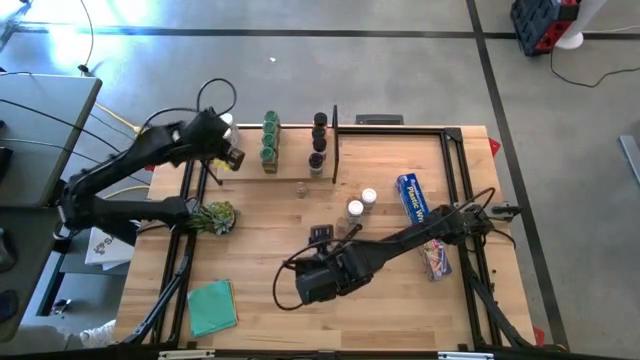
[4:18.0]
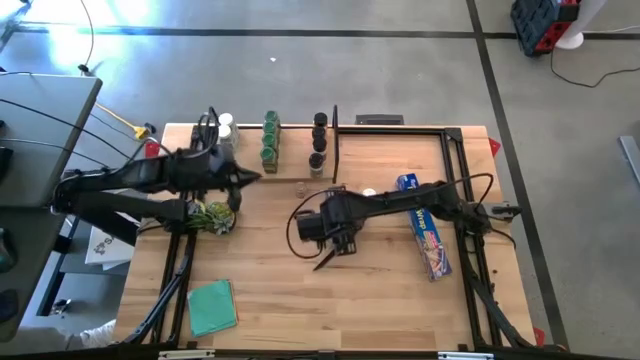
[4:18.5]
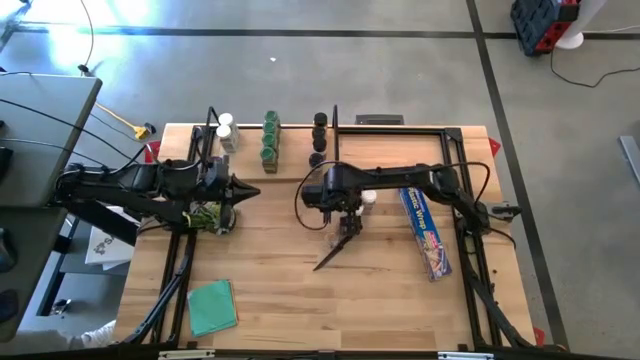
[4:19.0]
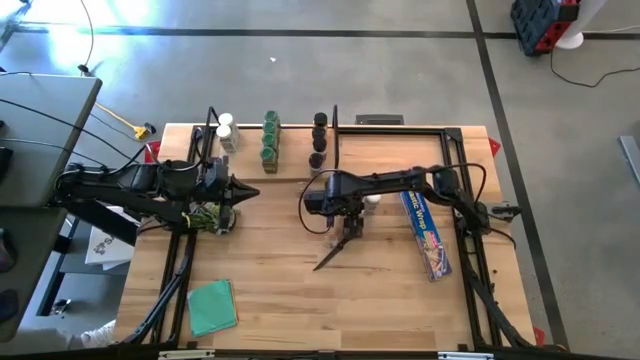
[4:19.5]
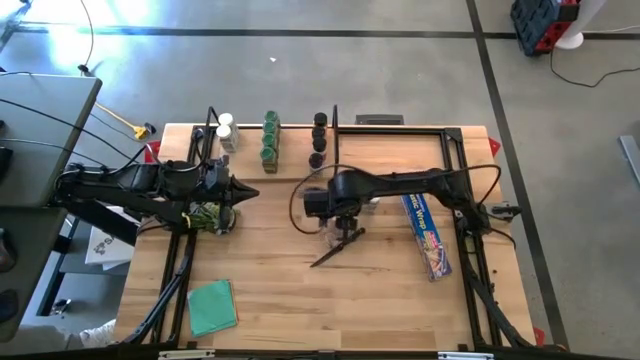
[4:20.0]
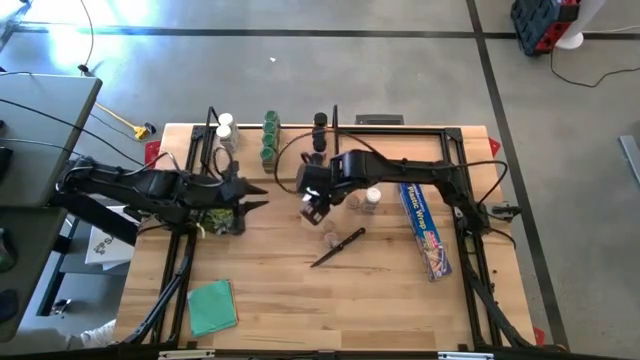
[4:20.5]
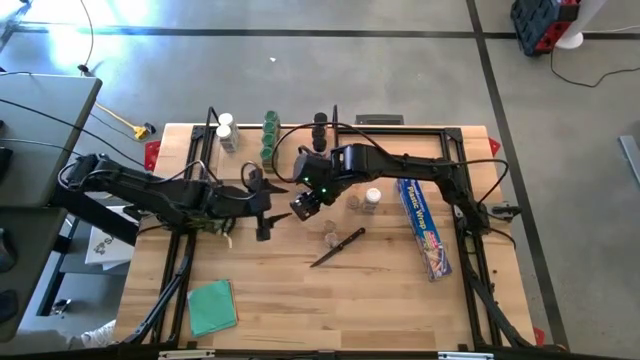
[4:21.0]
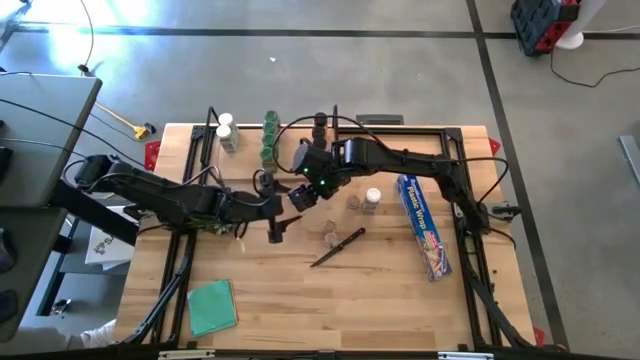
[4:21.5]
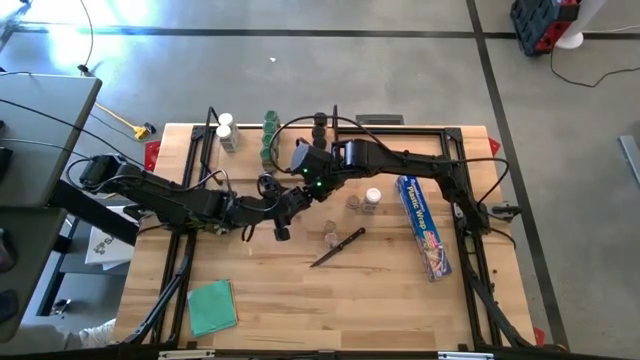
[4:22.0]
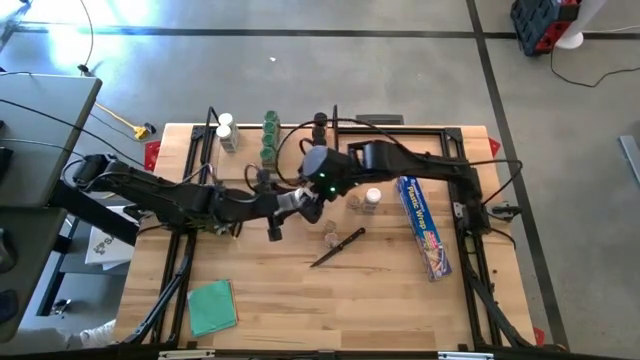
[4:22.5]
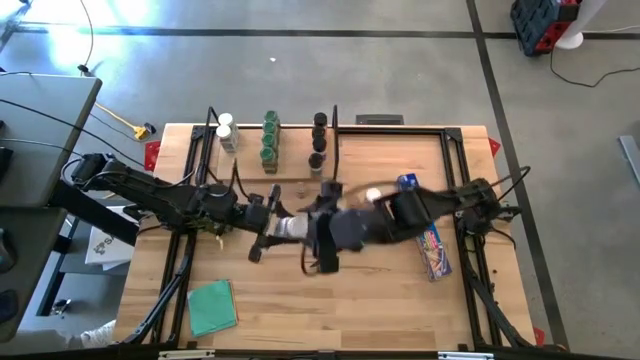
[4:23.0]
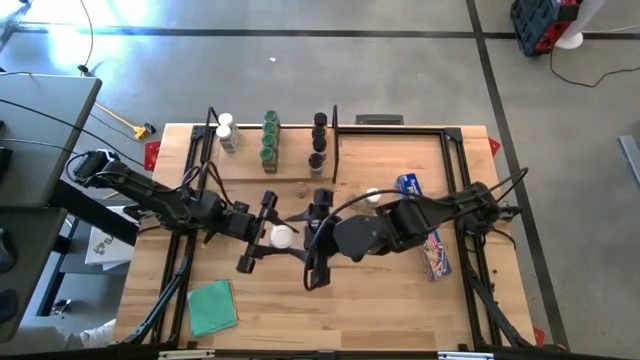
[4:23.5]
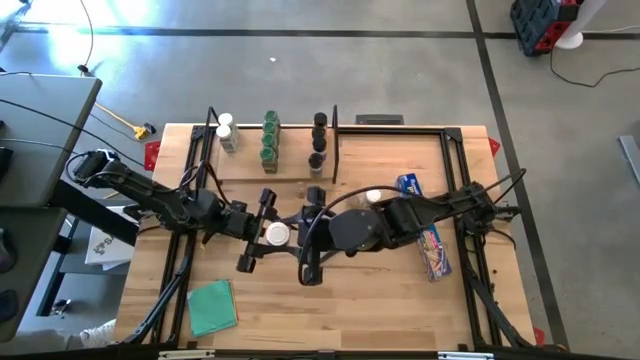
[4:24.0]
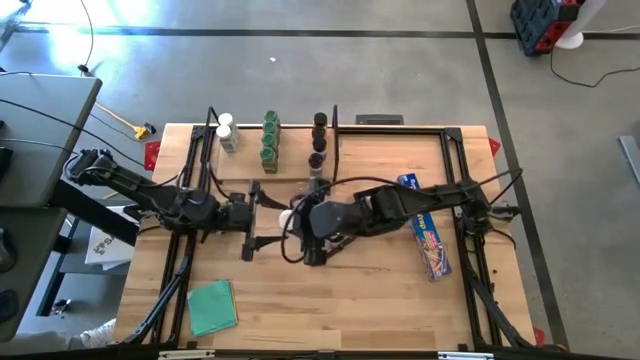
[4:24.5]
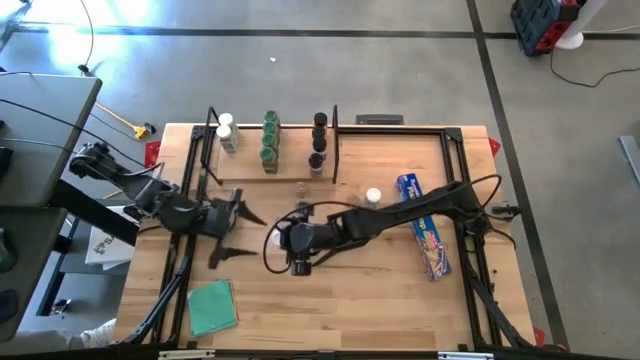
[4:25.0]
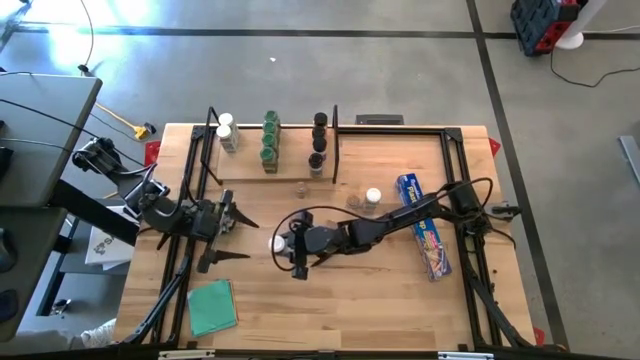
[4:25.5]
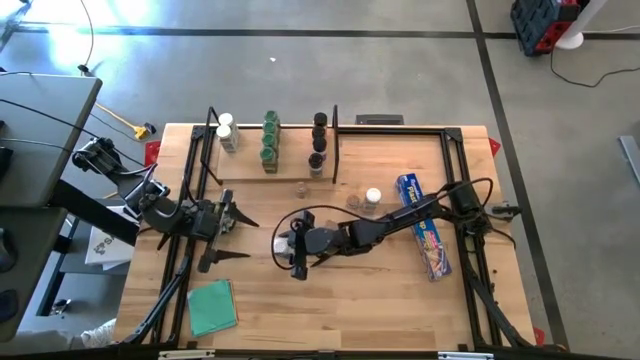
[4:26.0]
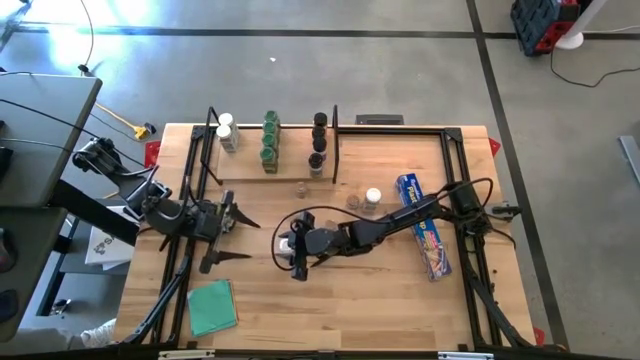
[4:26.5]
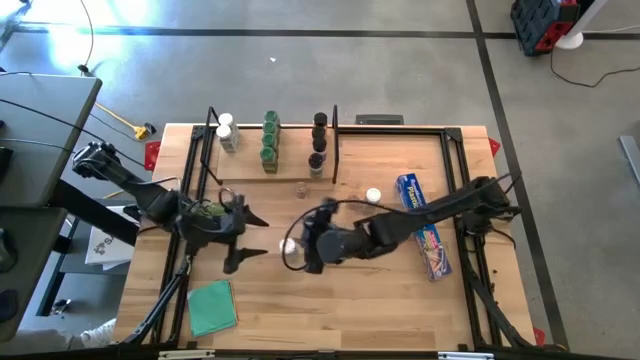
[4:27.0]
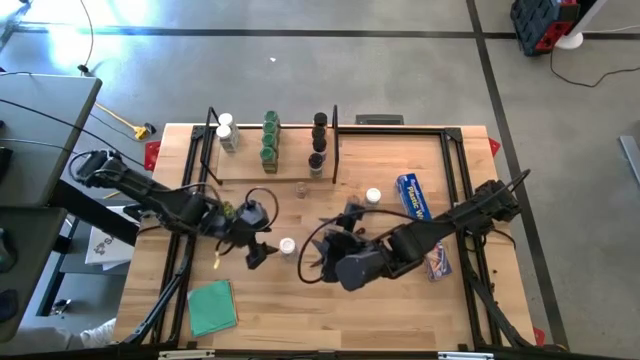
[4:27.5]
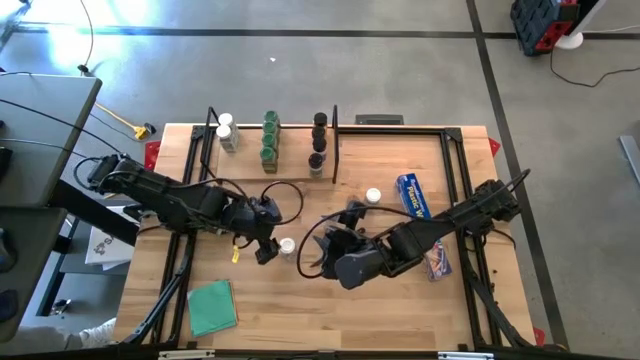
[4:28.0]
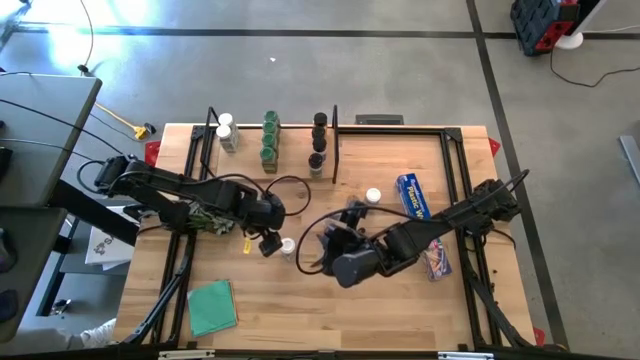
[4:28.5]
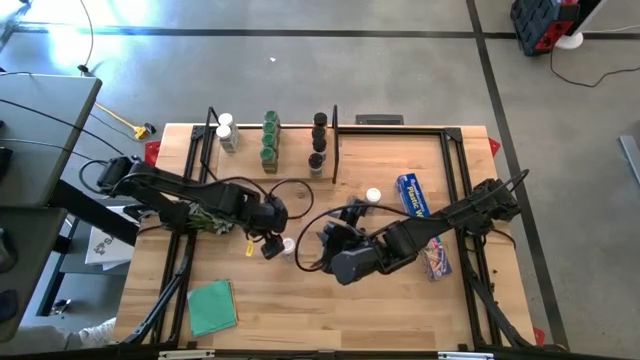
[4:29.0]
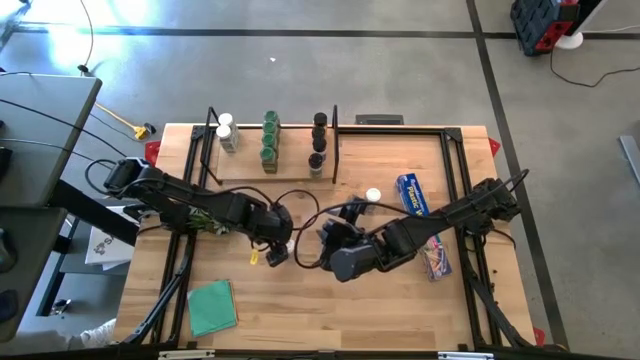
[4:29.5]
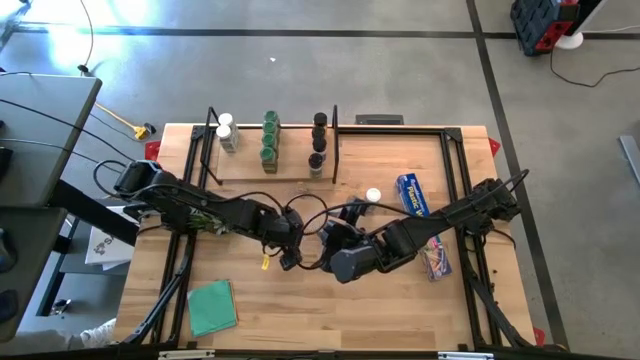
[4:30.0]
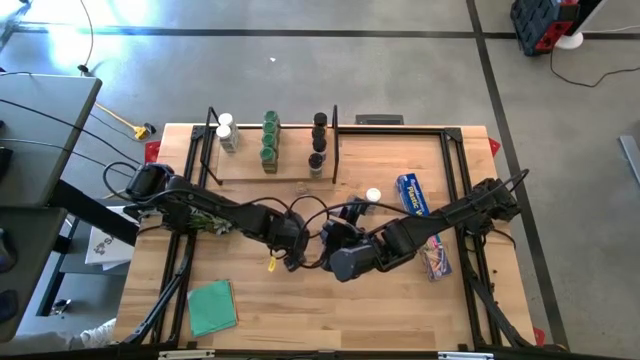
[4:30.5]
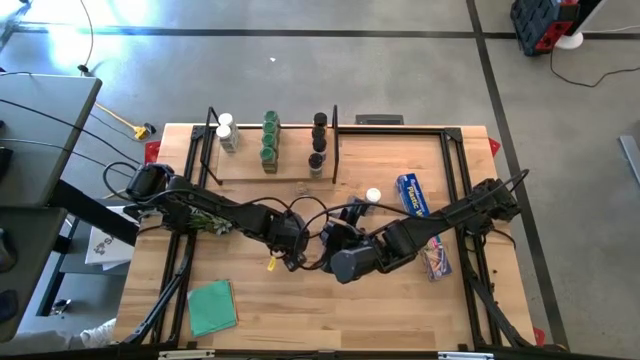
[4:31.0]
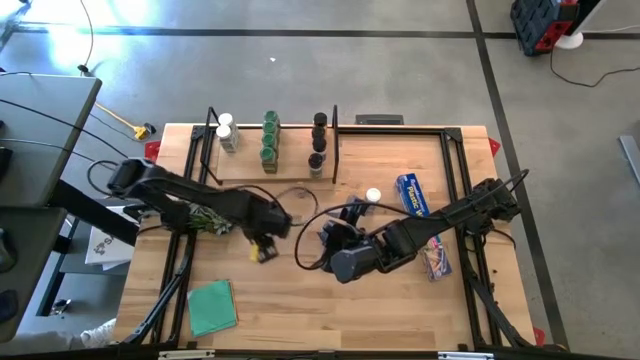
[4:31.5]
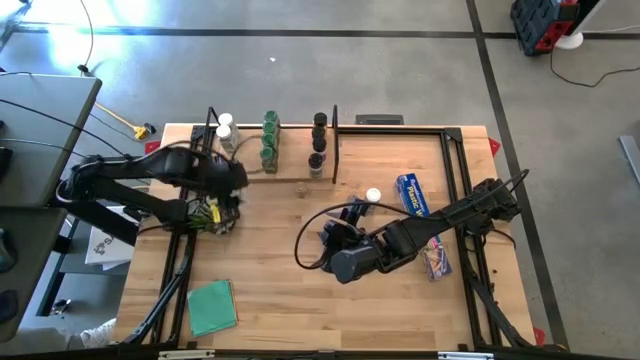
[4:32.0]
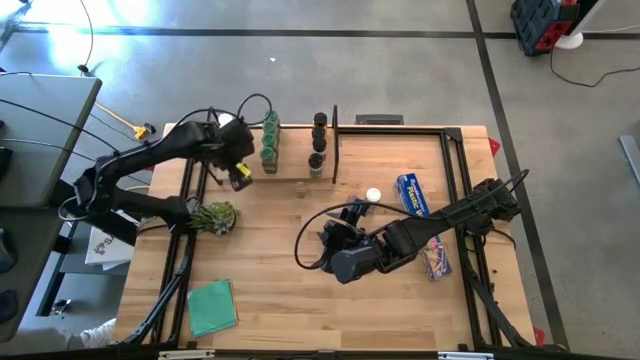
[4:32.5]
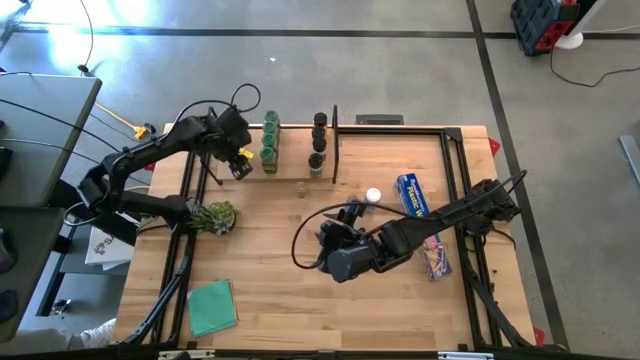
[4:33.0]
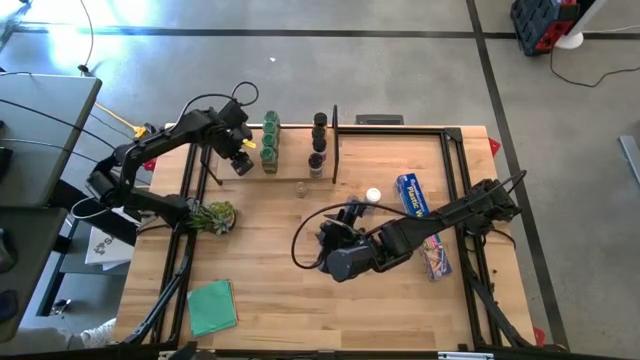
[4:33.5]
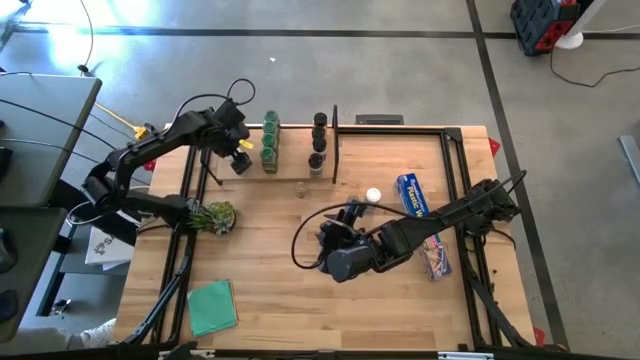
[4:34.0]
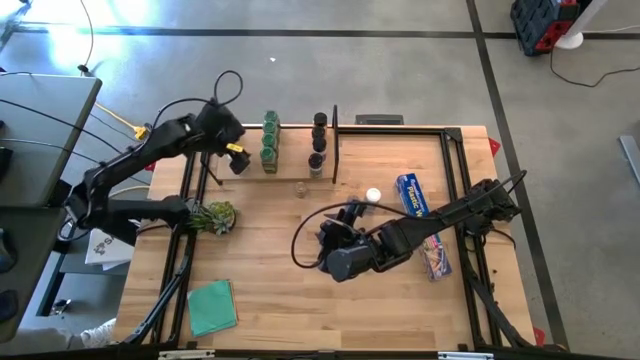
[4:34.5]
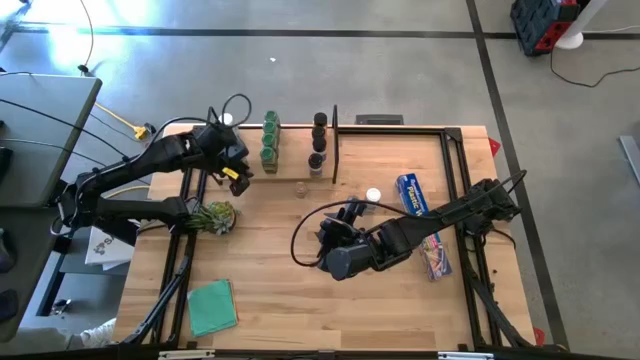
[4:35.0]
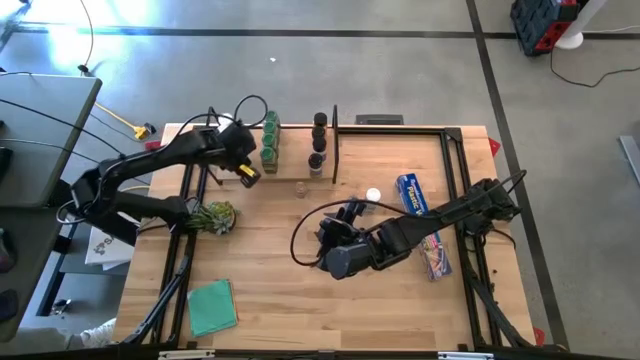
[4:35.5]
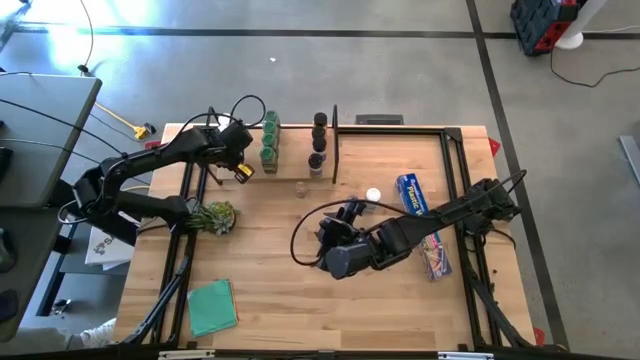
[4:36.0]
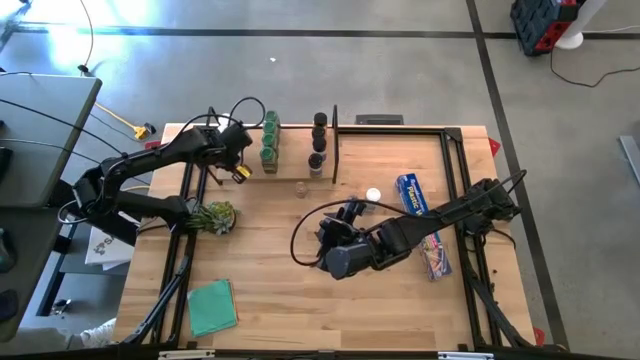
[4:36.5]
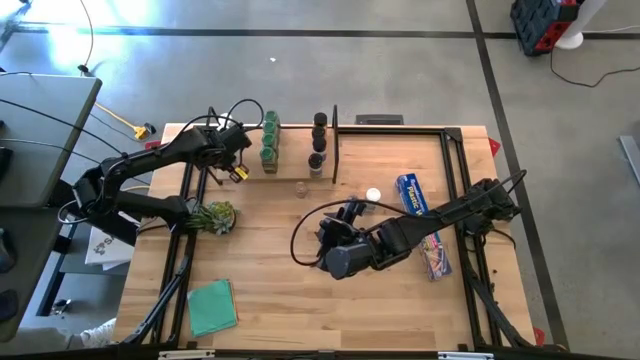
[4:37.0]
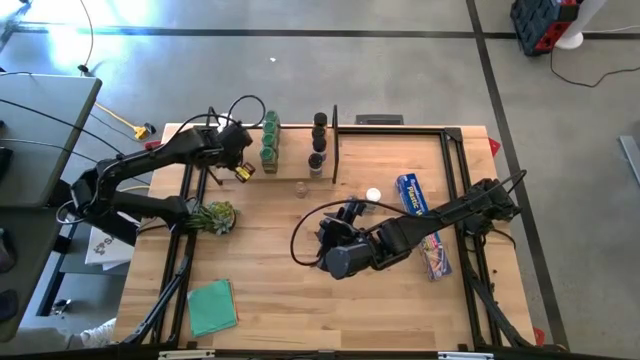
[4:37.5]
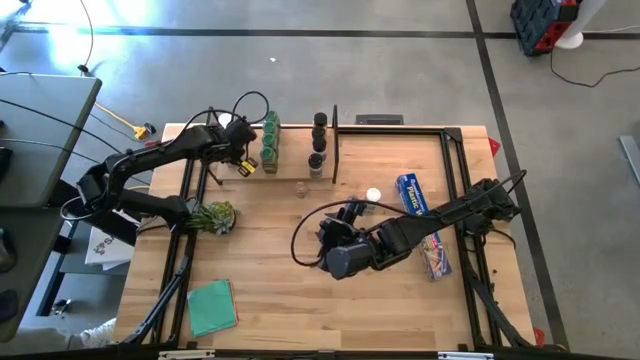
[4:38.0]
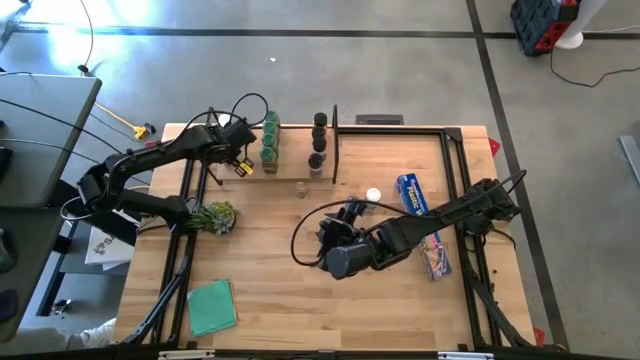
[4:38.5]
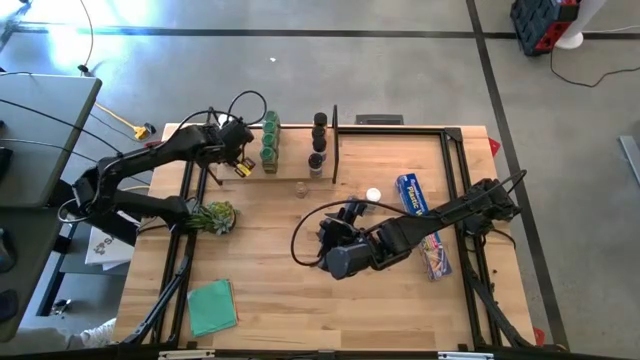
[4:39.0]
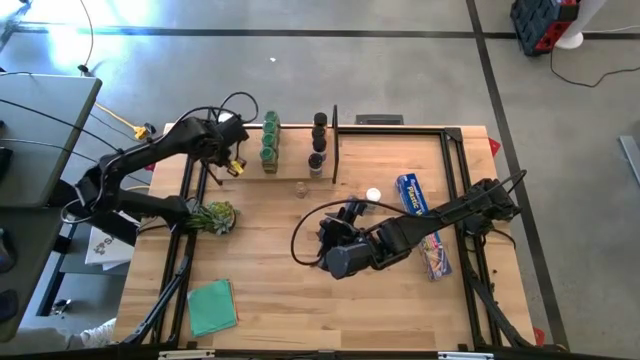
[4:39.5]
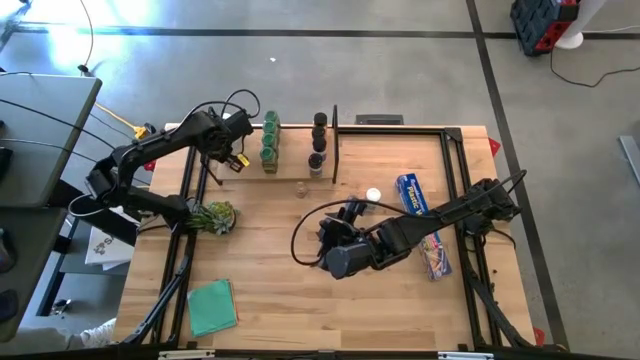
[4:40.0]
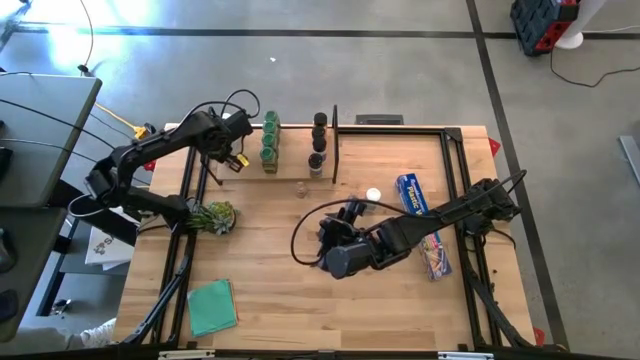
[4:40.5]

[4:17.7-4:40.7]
Task: Shelf spices
Put the white lid seasoning bottle on the shelf
